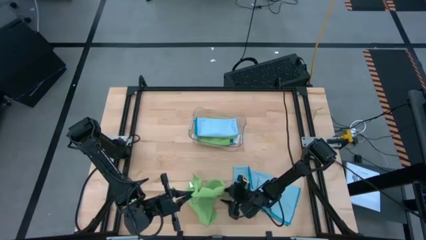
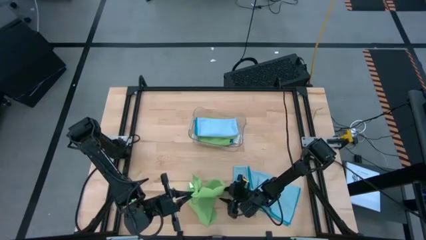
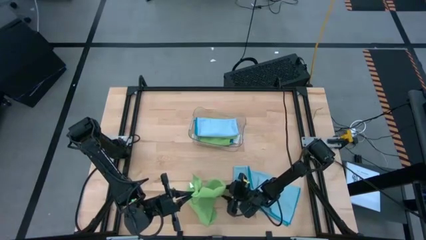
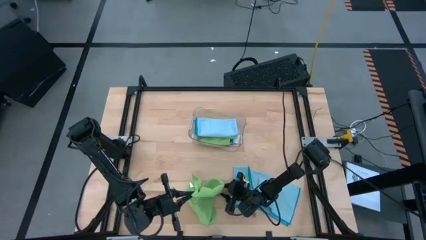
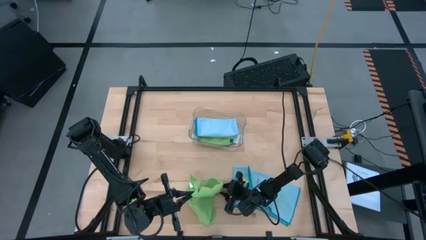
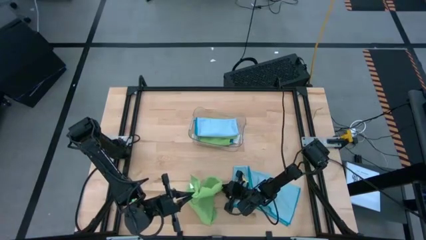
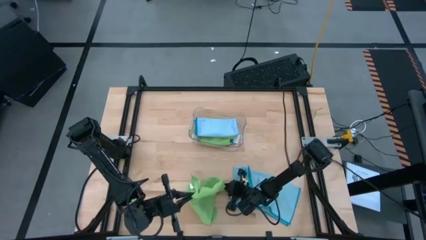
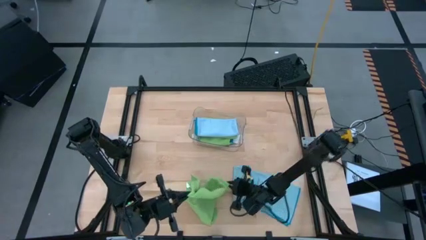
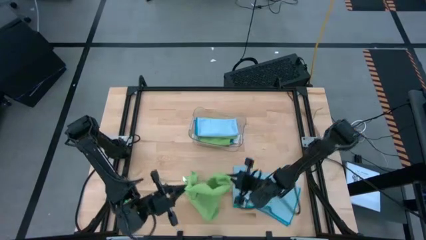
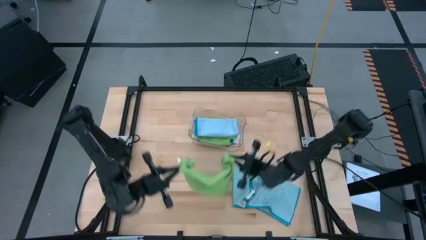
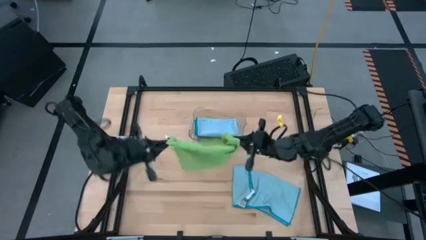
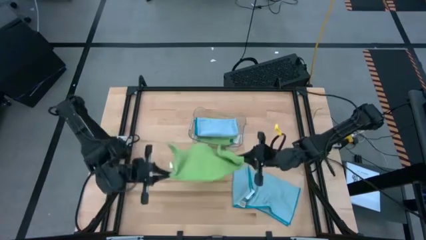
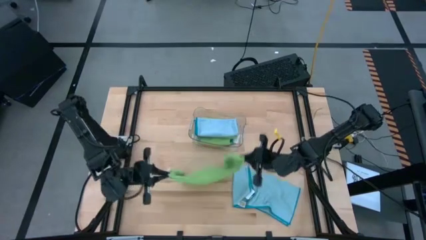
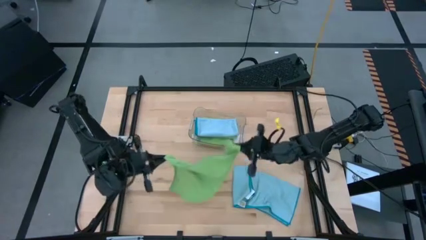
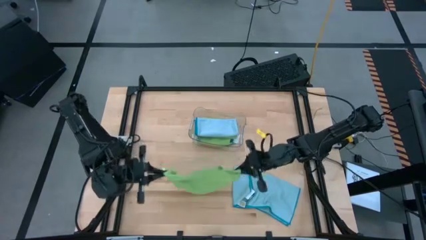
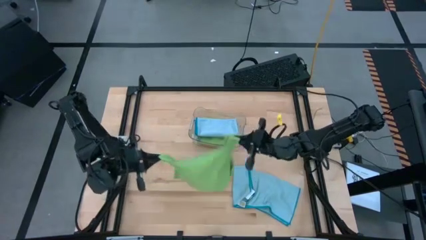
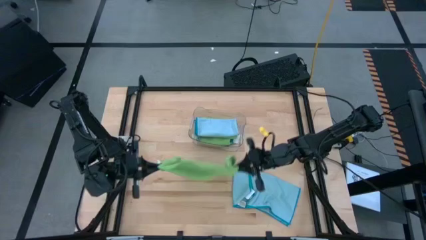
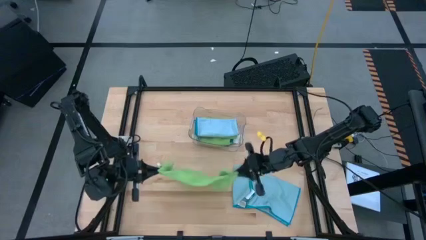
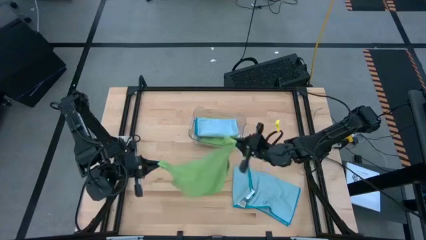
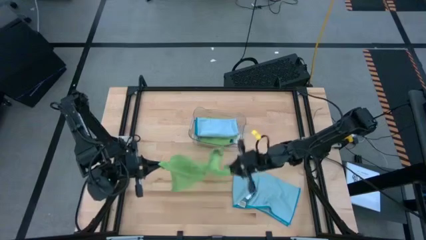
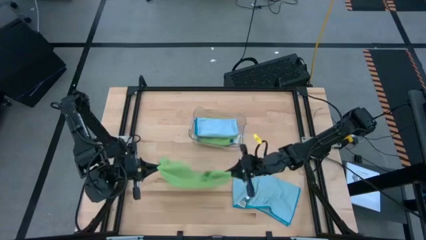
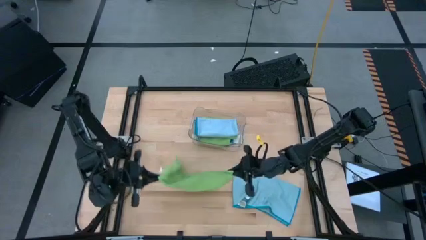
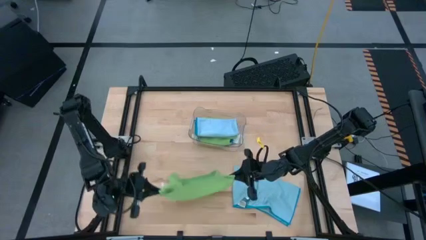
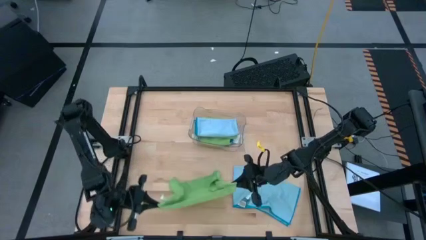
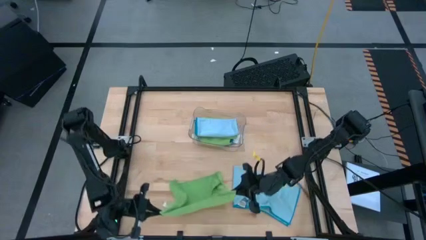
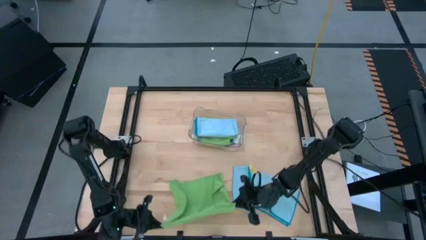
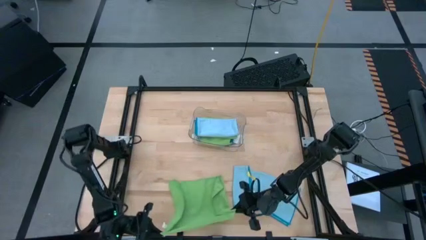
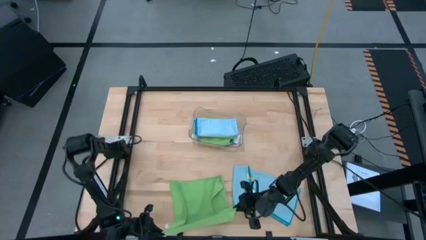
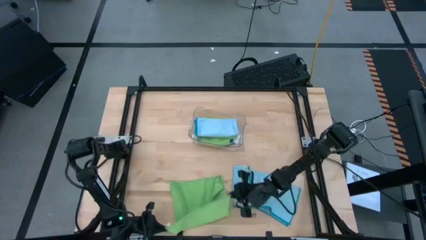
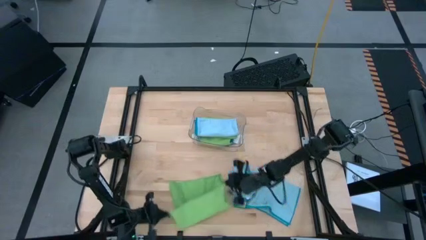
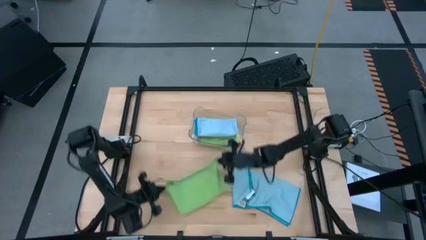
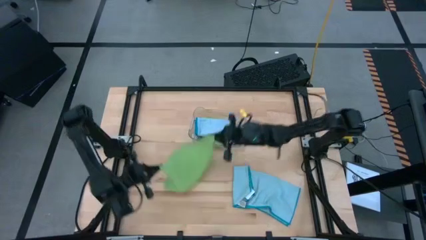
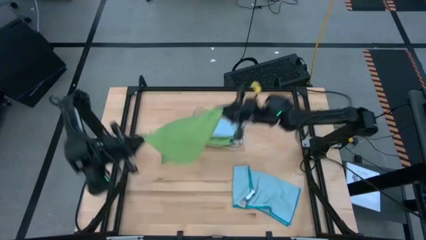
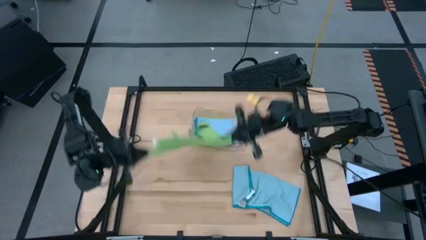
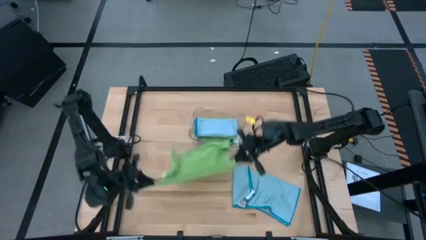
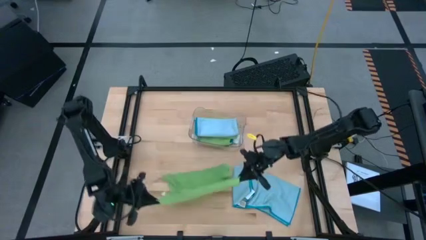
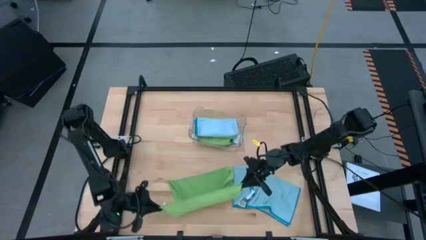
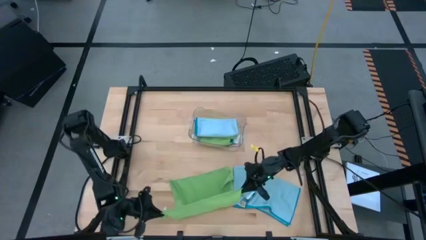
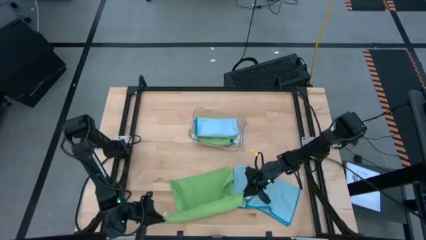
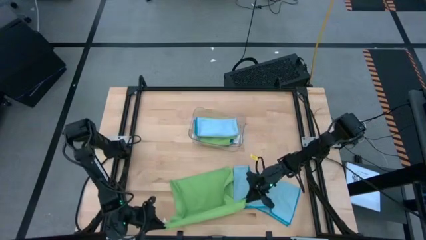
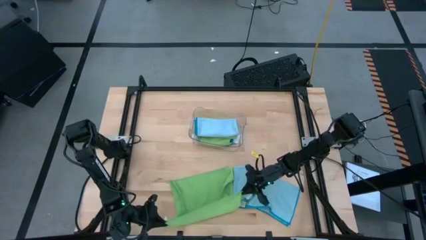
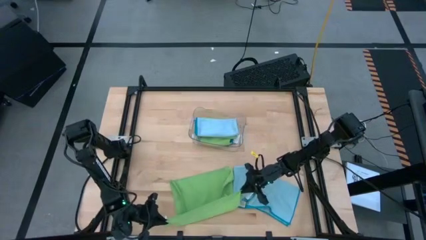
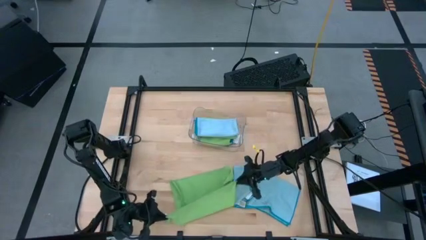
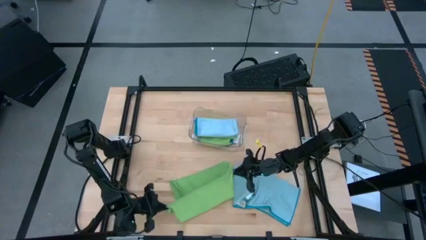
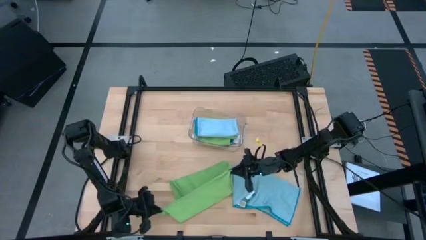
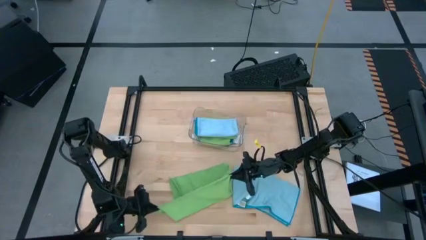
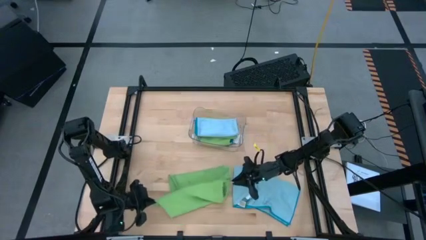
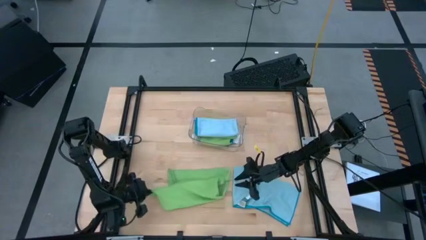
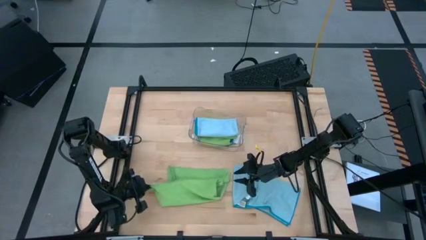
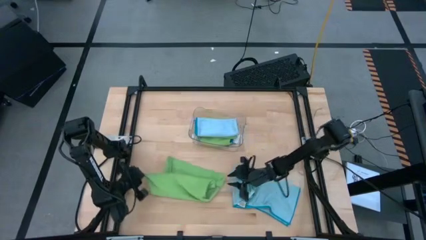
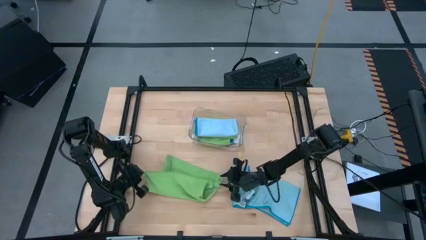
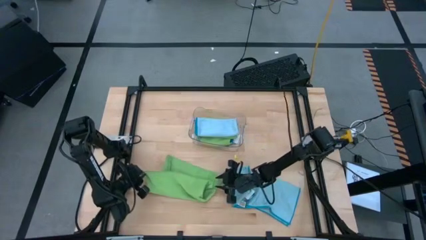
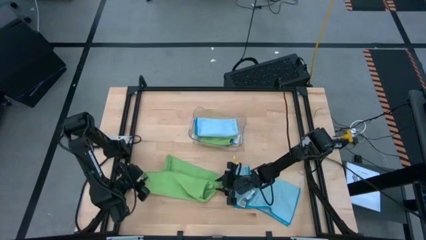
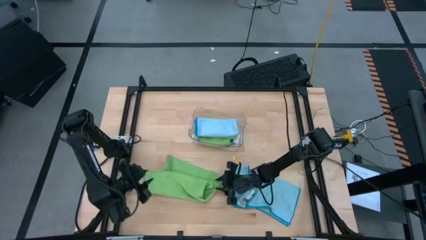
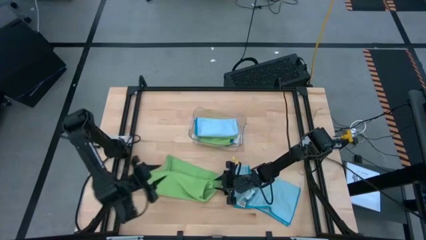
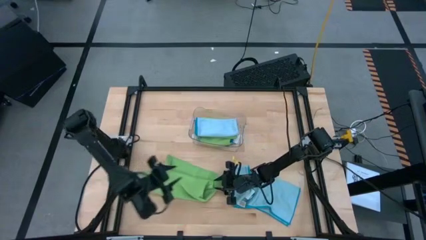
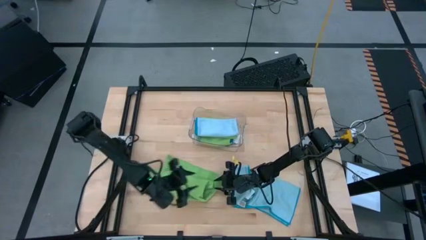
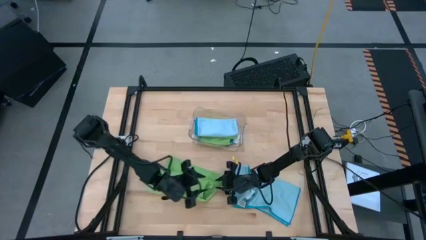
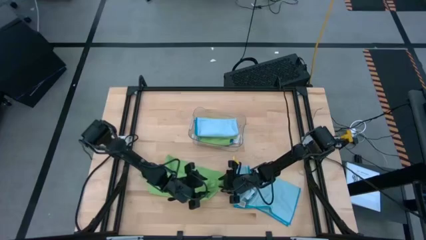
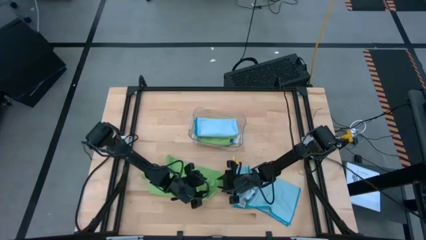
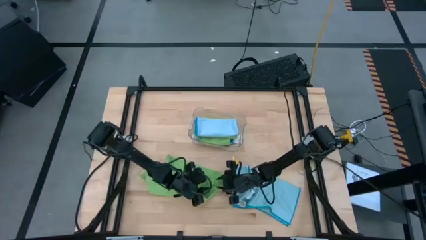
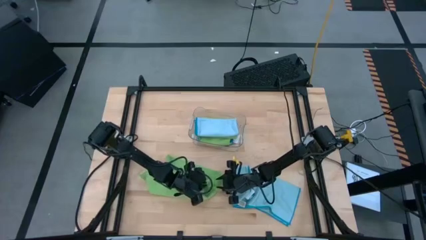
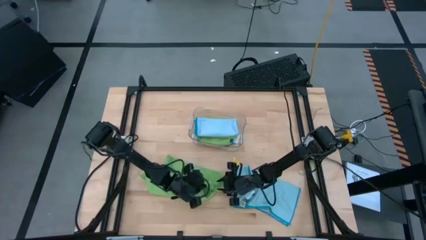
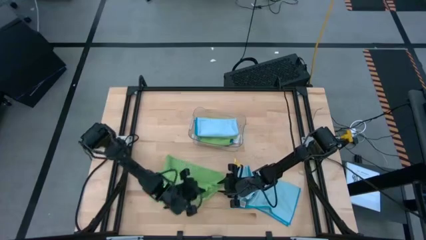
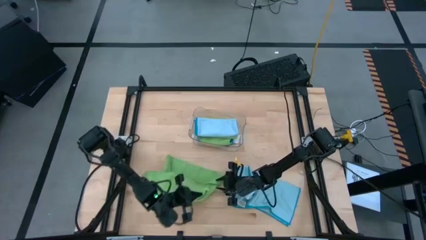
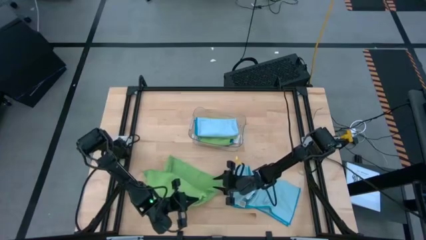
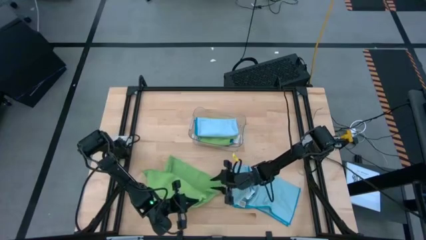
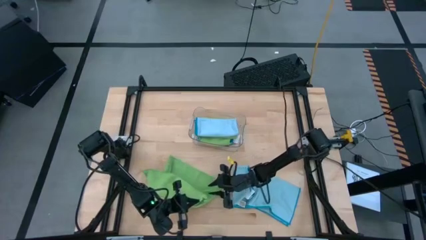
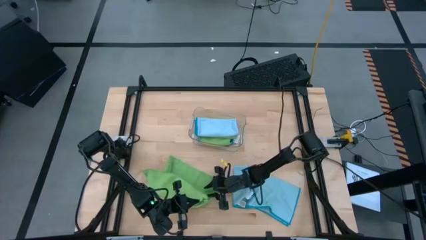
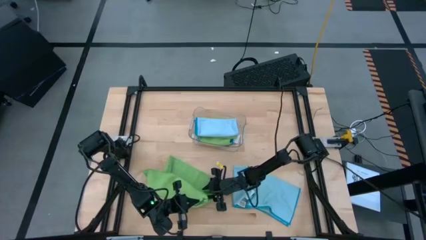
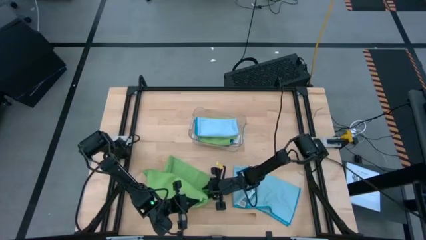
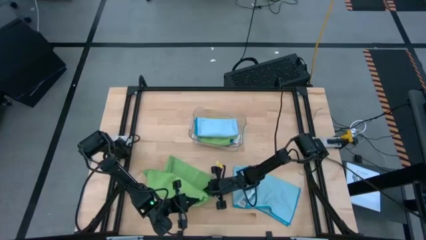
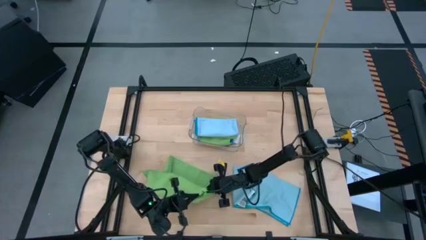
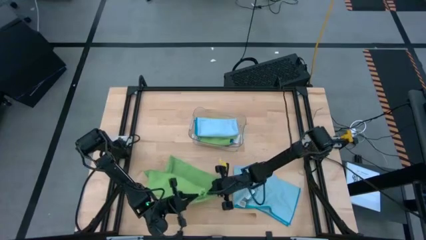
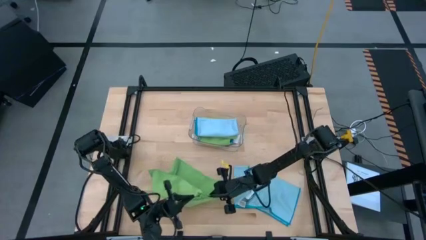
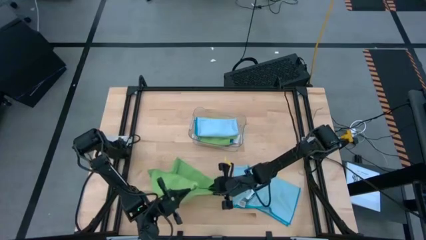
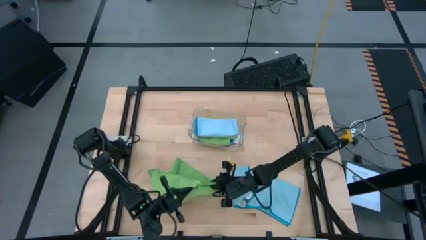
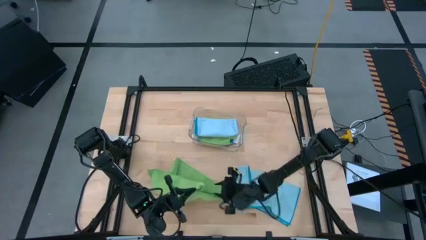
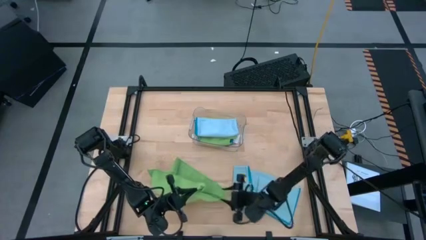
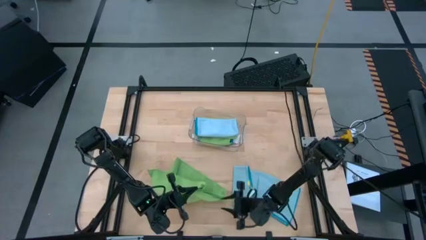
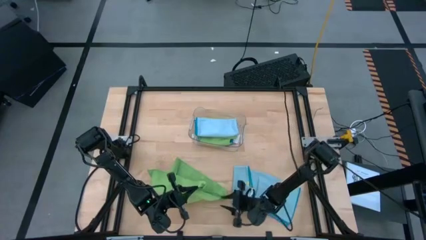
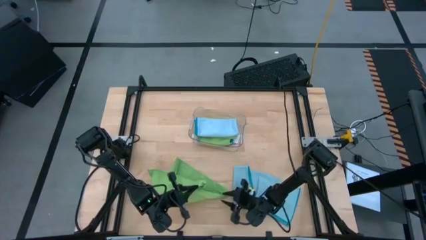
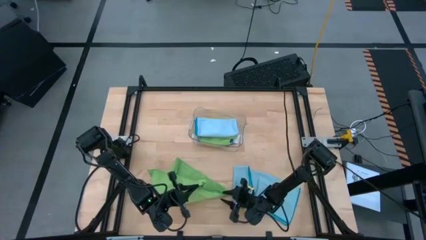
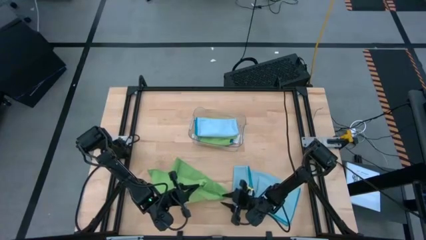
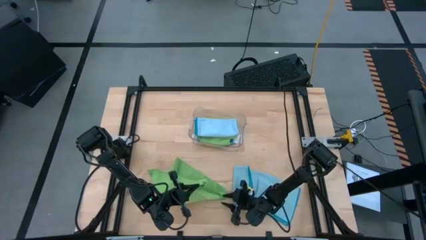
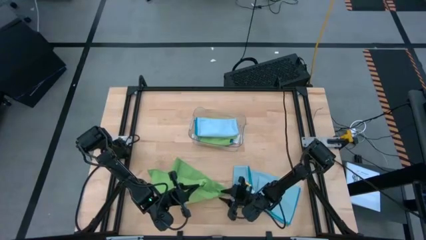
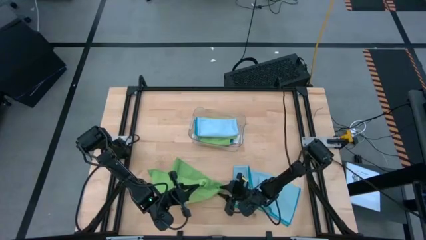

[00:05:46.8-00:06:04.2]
Task: Fold microfiber towels
Fold the green microfiber cloth
